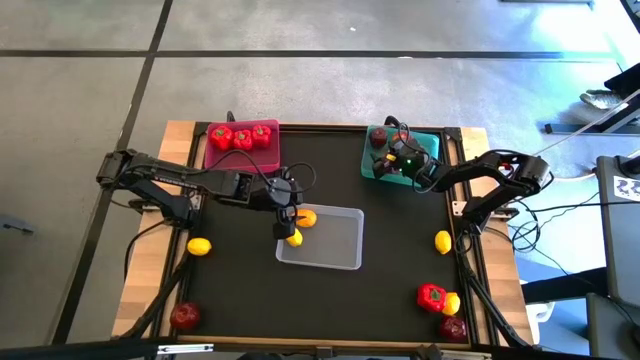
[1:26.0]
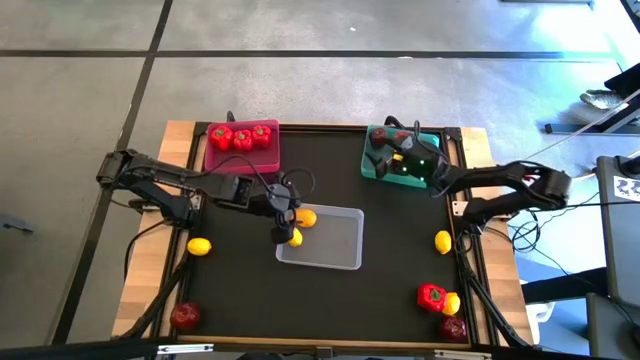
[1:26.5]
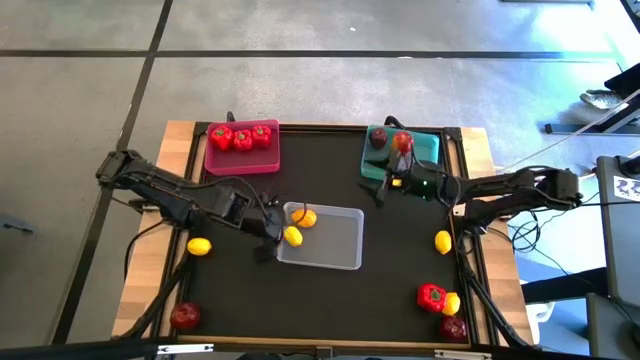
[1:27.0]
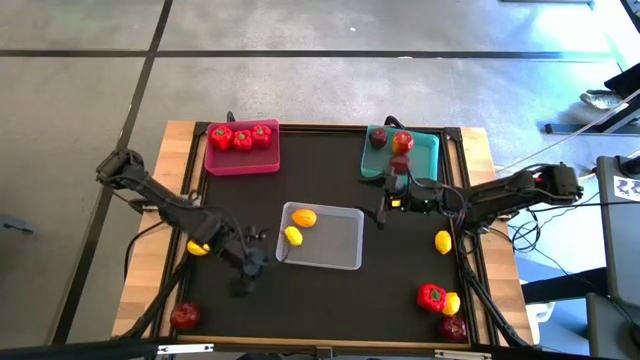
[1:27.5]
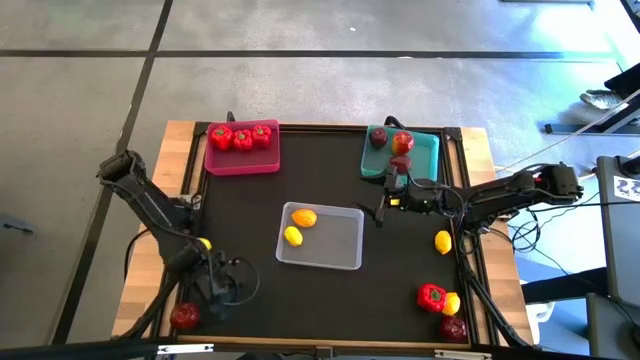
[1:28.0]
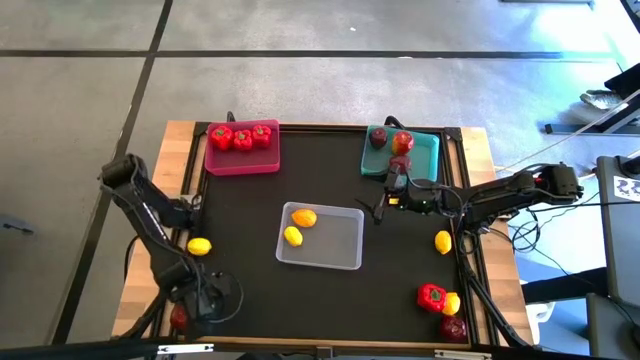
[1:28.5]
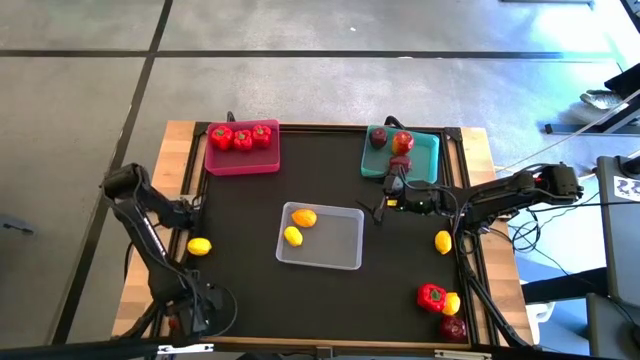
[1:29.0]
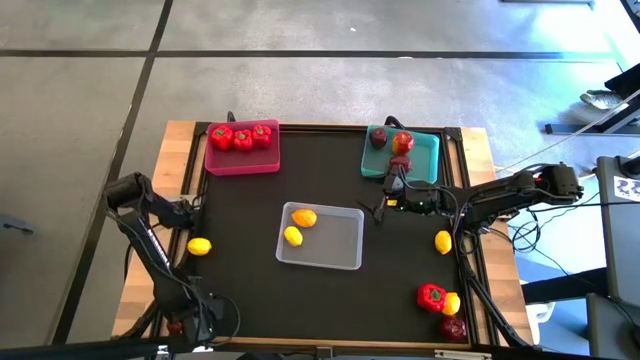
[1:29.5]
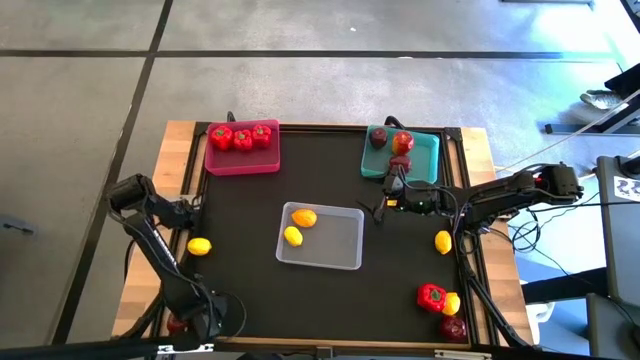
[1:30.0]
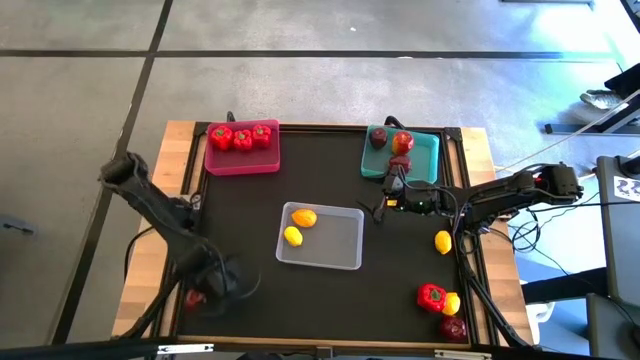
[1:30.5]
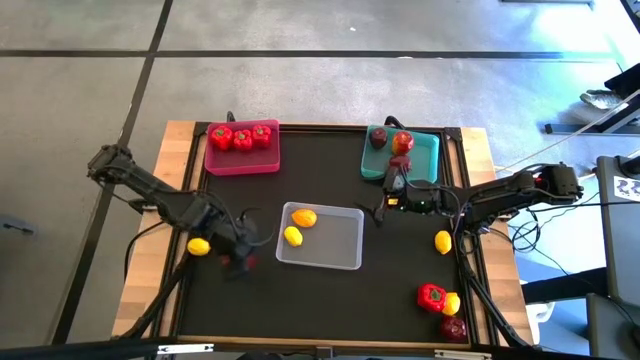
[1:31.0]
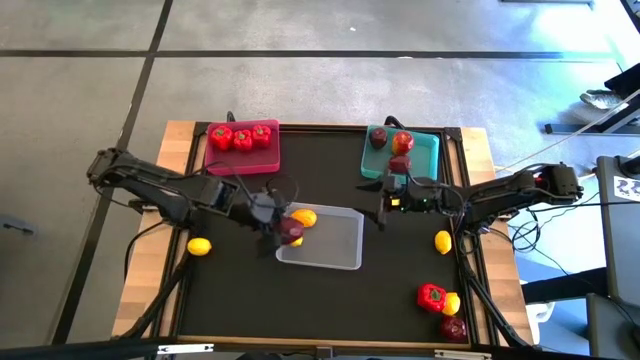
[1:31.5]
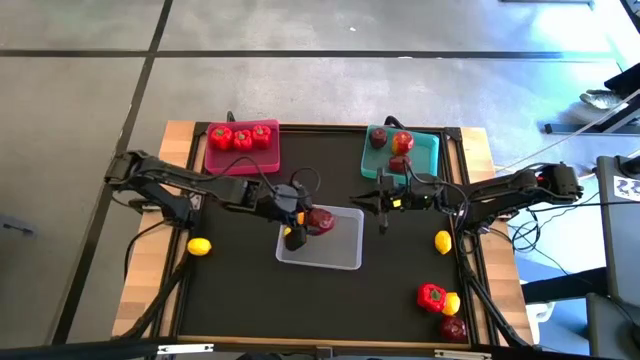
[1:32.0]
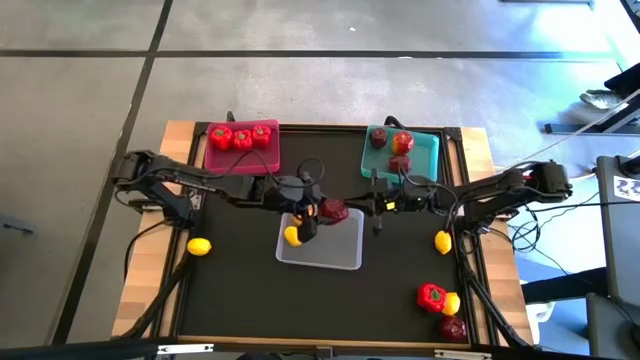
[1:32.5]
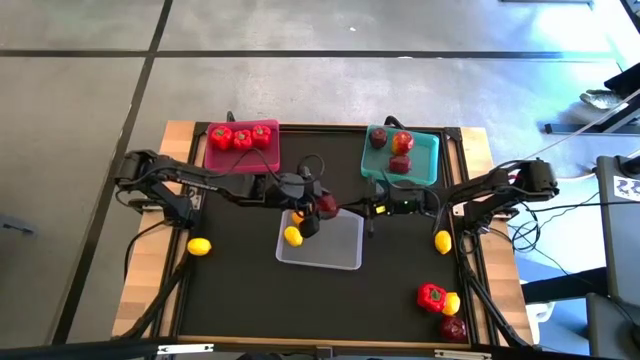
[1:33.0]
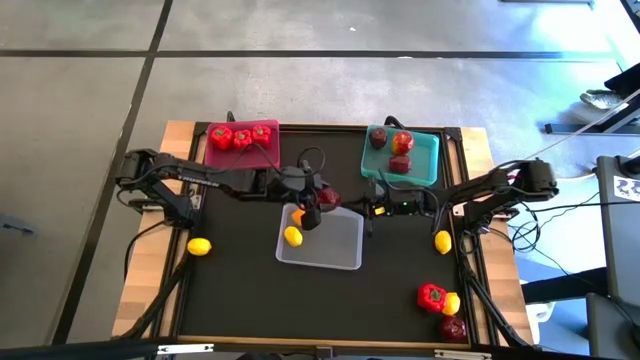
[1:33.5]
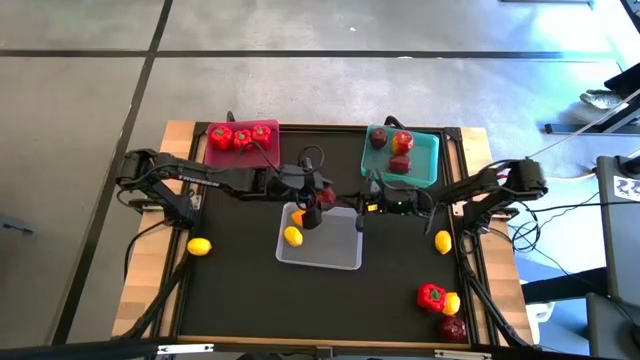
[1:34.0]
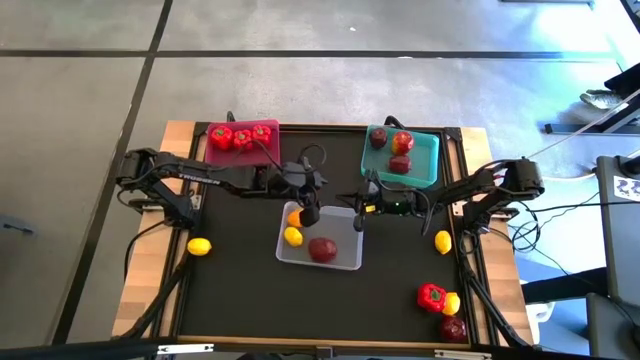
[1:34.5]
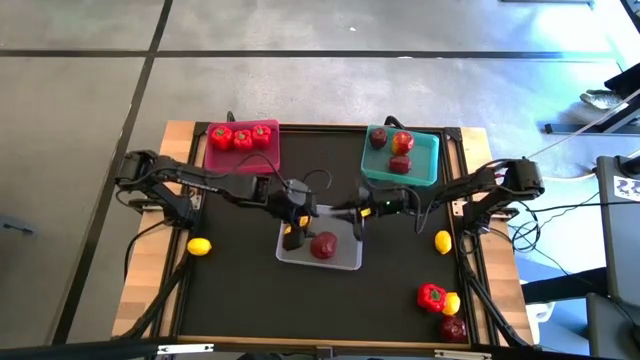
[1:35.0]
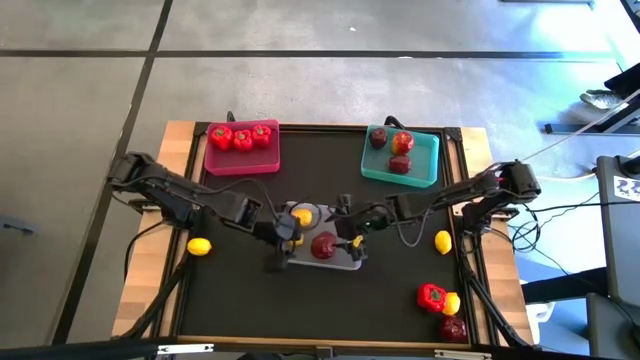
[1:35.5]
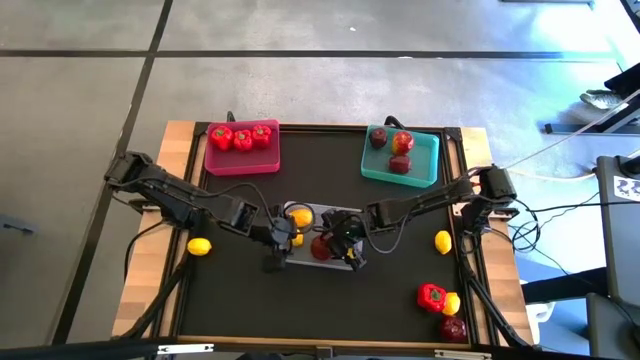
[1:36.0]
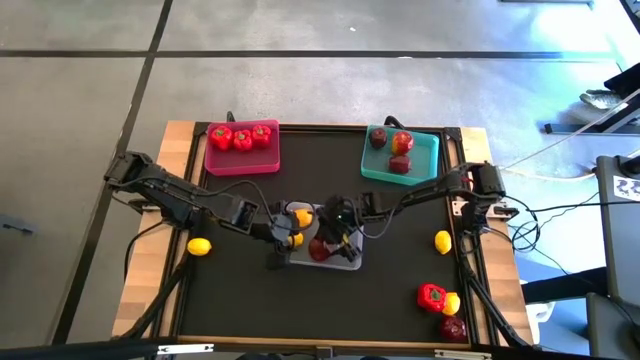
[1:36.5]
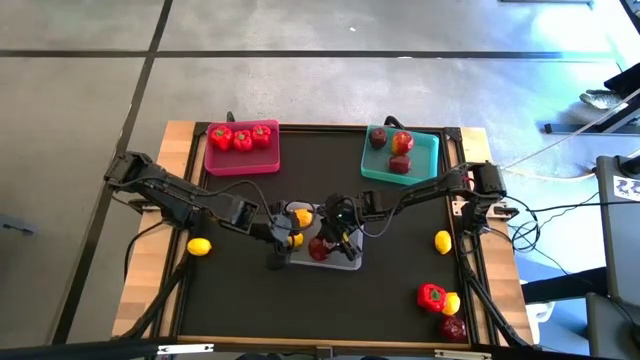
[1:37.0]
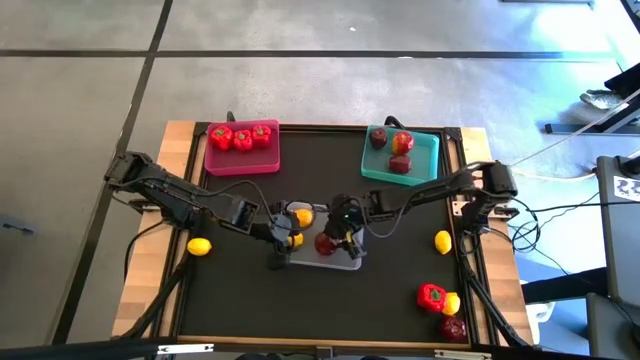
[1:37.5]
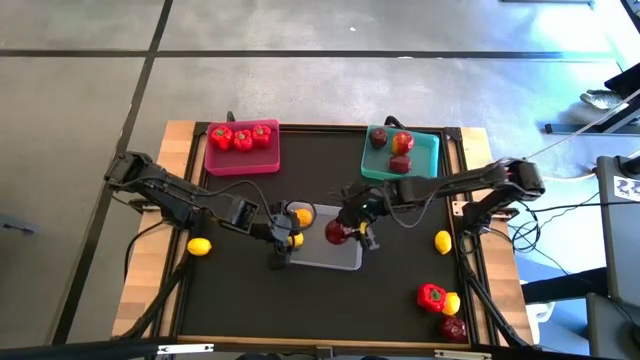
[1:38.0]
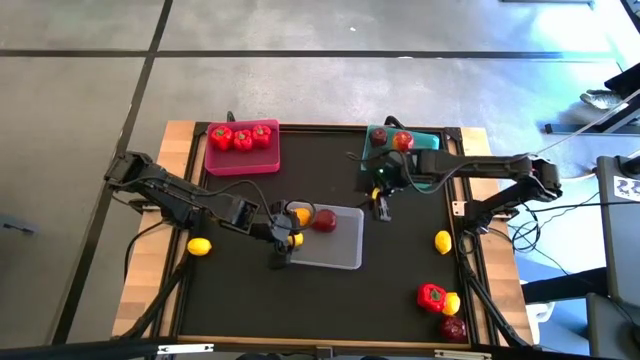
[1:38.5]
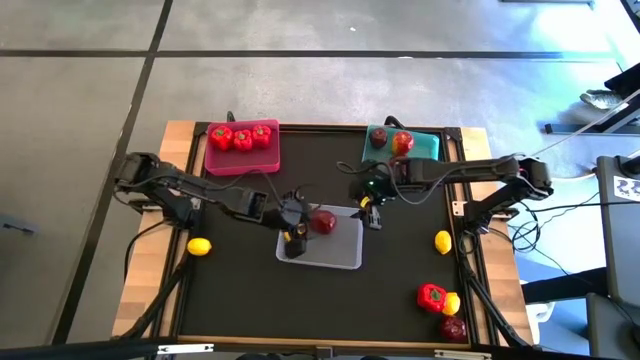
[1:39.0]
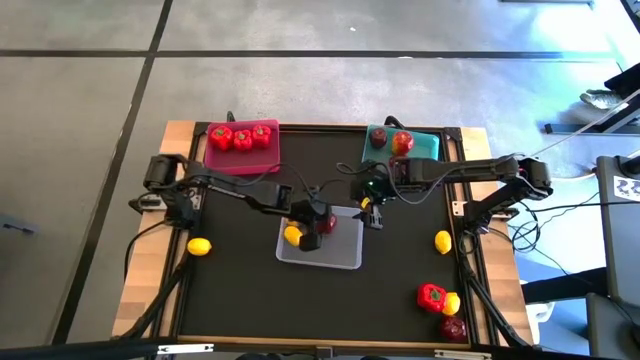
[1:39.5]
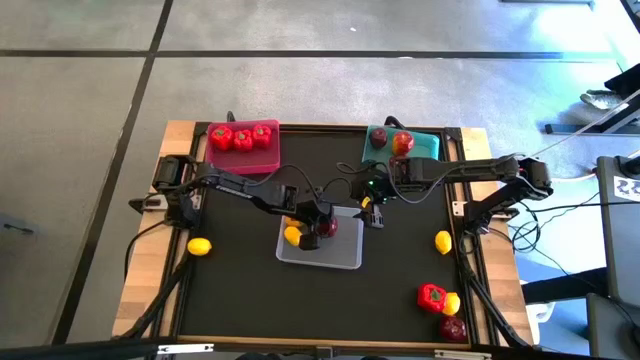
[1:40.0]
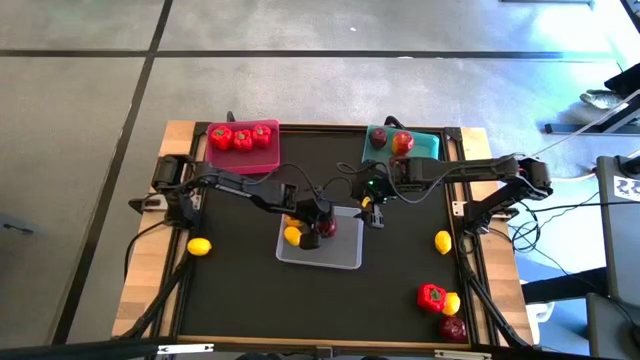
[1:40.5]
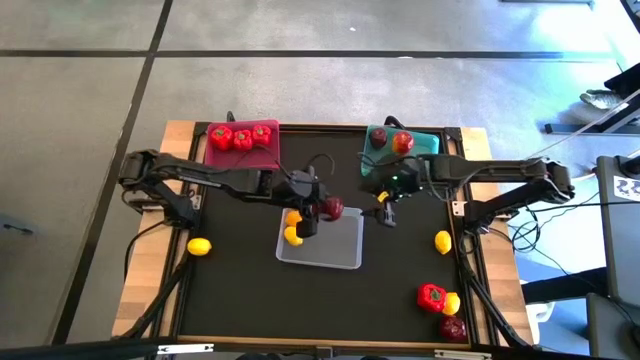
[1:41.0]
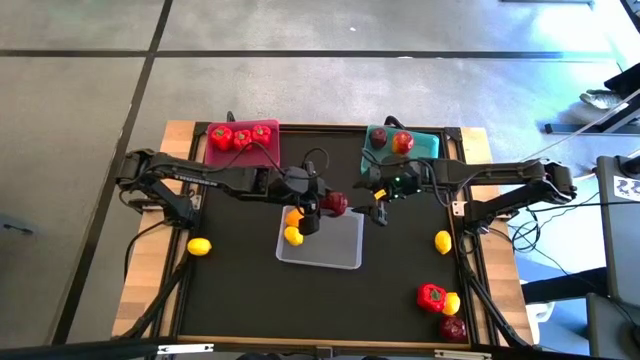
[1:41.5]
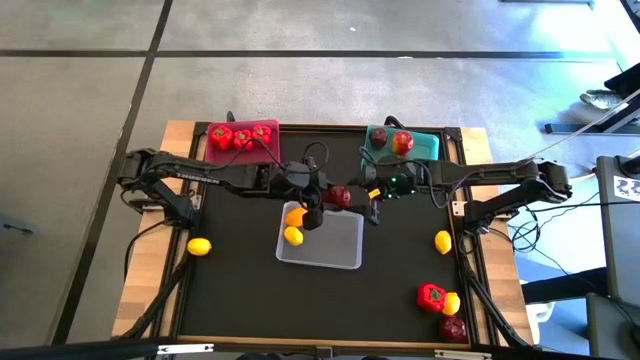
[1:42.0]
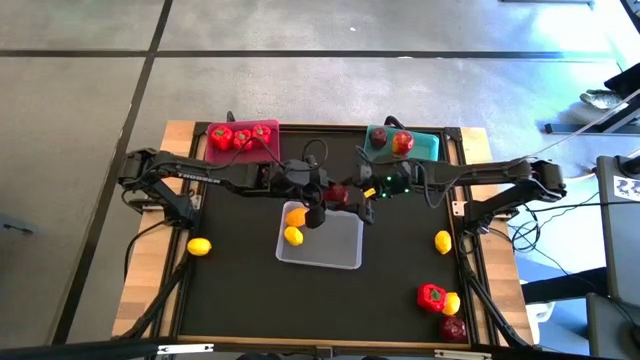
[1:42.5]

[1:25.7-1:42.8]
Task: Sort produce into baskets
Put the apple into the blue bin

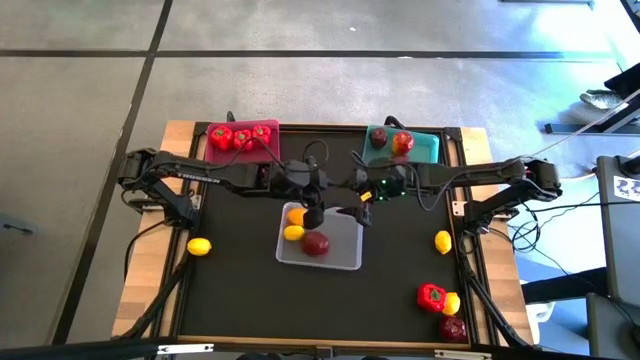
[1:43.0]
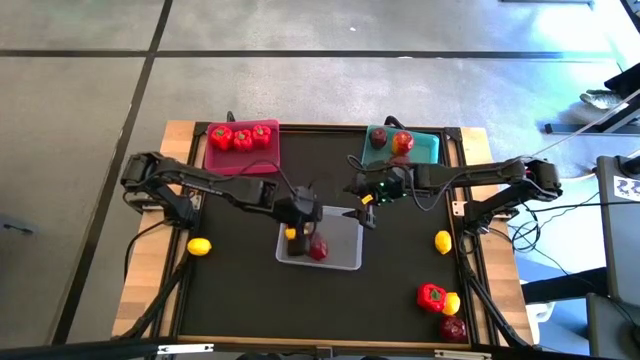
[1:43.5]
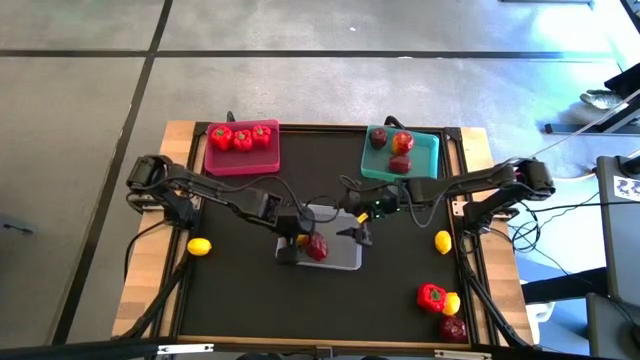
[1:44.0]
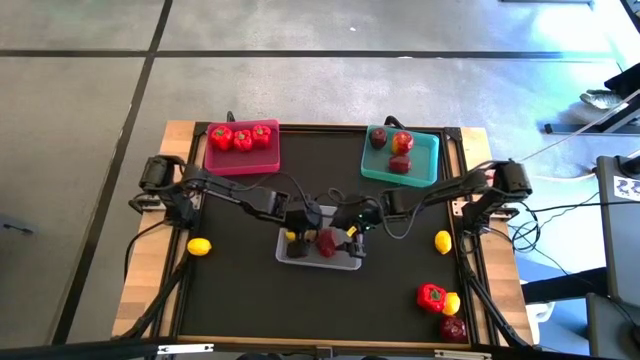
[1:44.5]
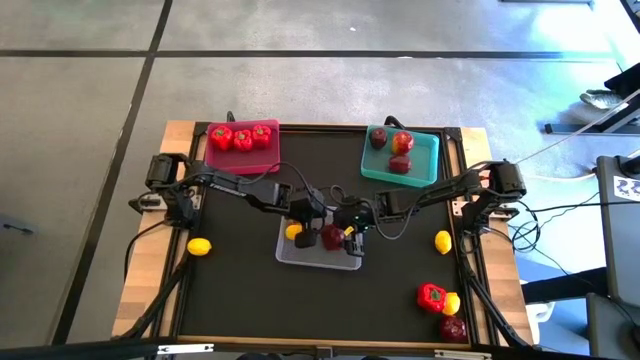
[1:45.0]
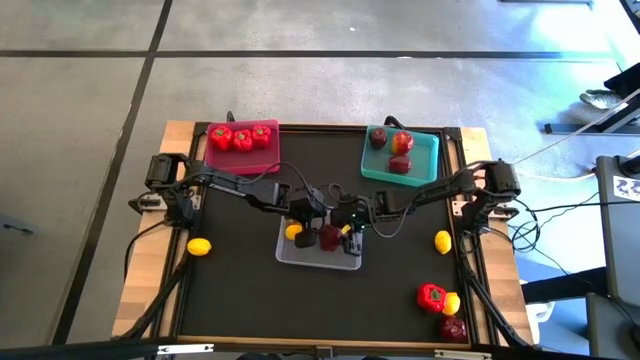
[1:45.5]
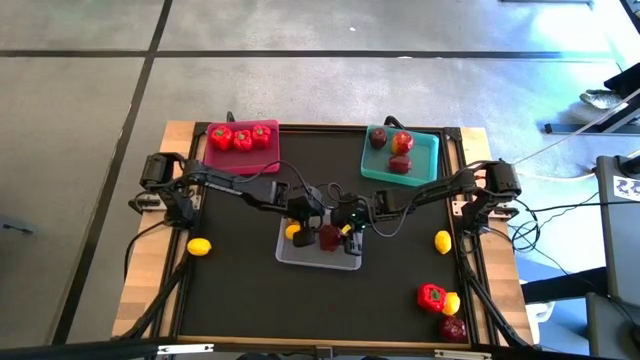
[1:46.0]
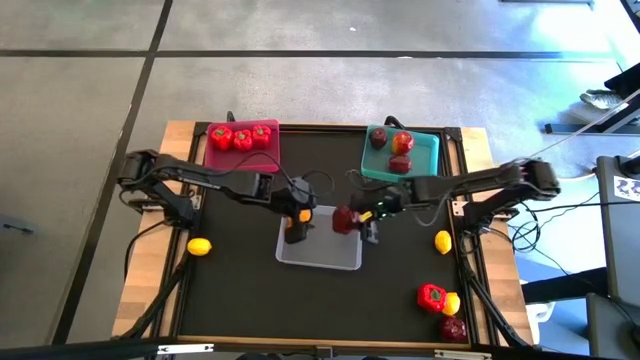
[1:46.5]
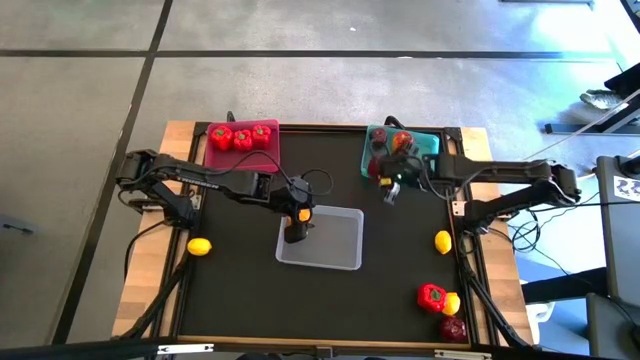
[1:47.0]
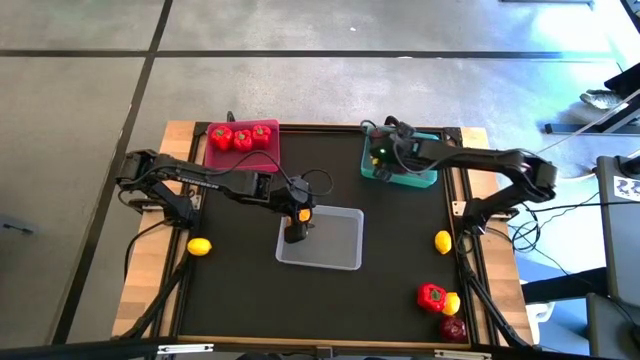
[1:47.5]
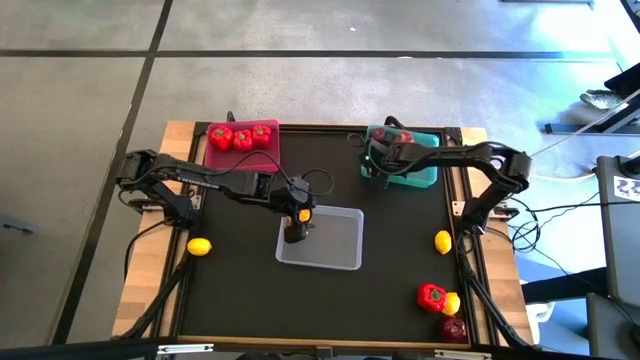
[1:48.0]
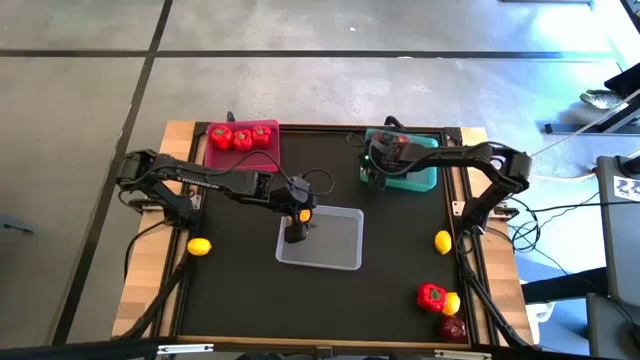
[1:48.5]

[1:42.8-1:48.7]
Put the apple into the blue bin
